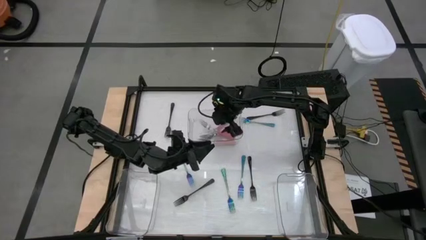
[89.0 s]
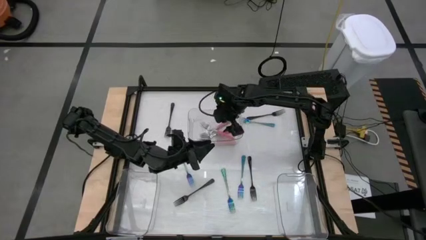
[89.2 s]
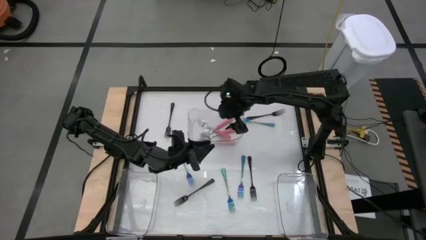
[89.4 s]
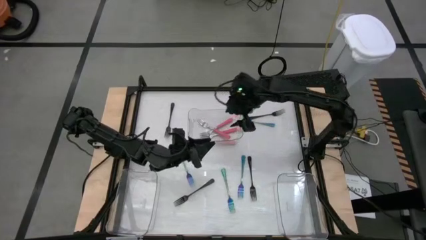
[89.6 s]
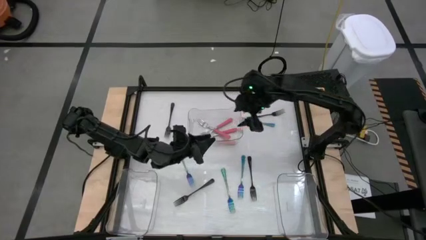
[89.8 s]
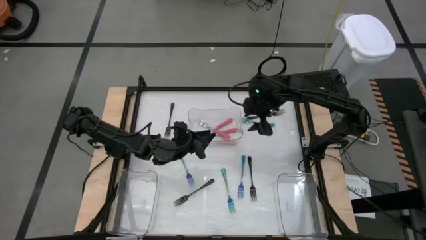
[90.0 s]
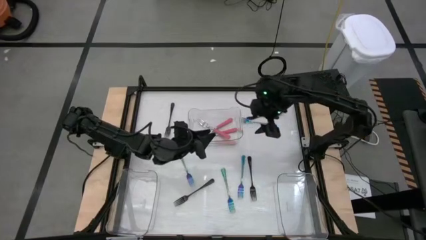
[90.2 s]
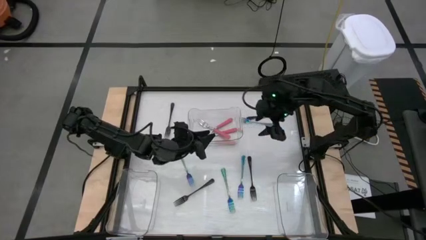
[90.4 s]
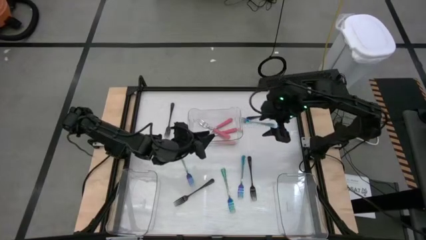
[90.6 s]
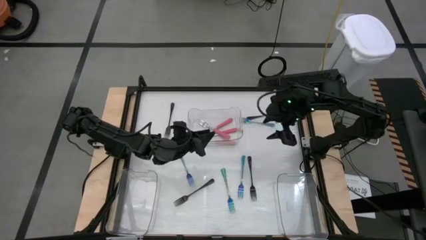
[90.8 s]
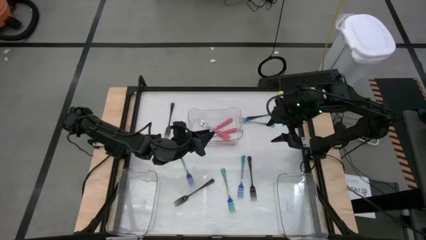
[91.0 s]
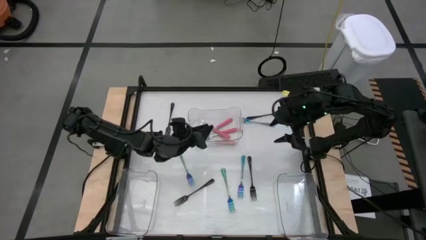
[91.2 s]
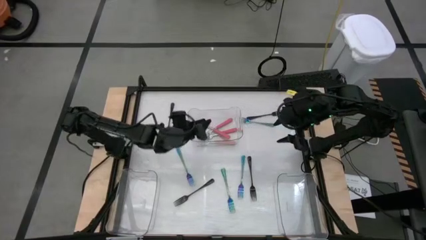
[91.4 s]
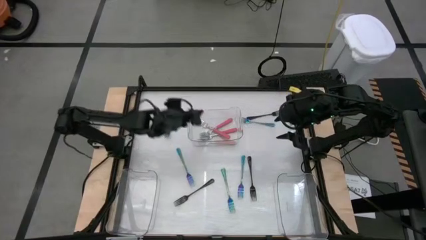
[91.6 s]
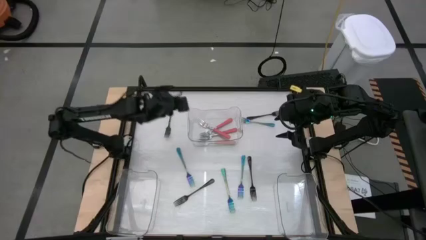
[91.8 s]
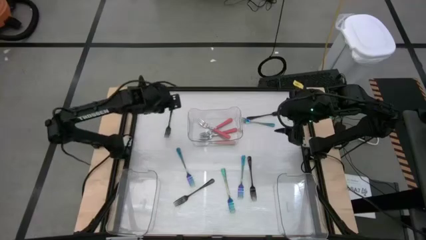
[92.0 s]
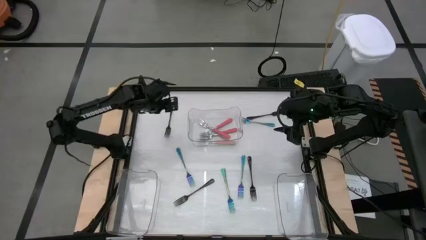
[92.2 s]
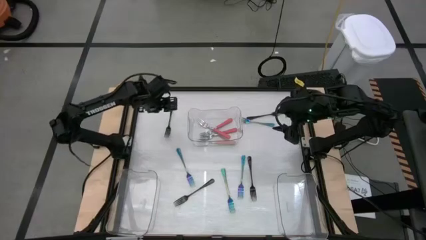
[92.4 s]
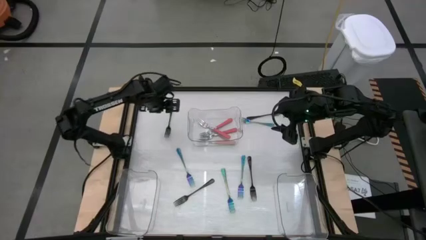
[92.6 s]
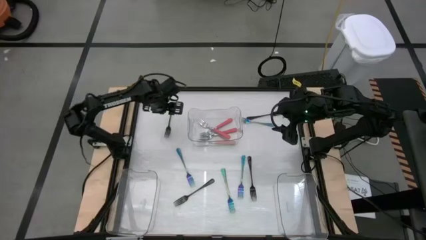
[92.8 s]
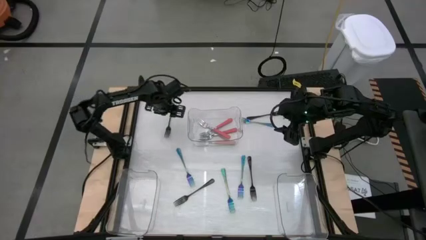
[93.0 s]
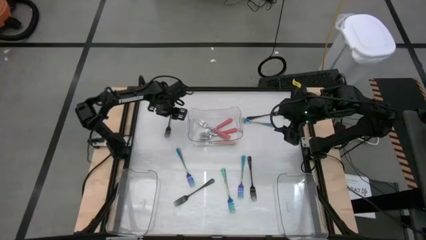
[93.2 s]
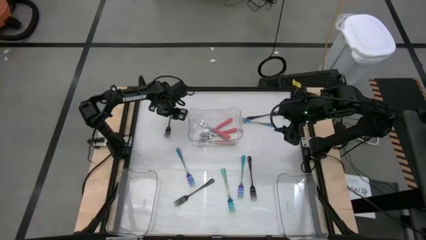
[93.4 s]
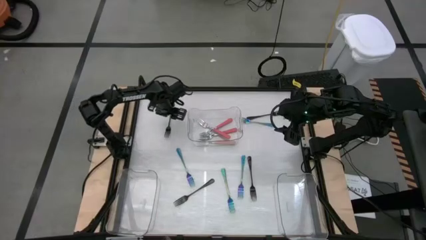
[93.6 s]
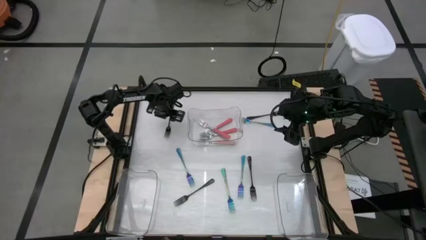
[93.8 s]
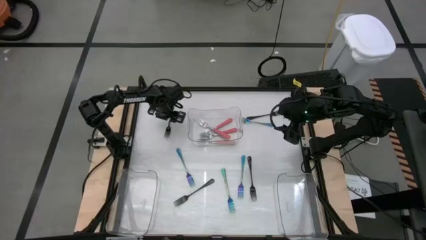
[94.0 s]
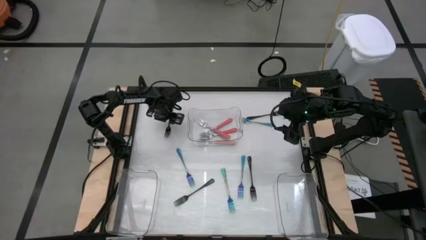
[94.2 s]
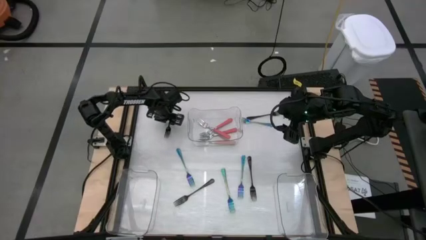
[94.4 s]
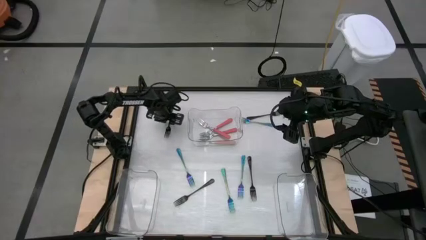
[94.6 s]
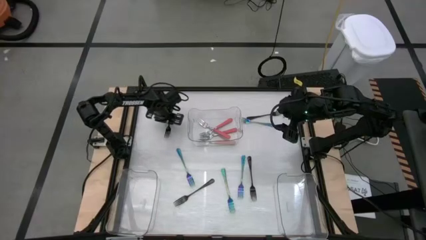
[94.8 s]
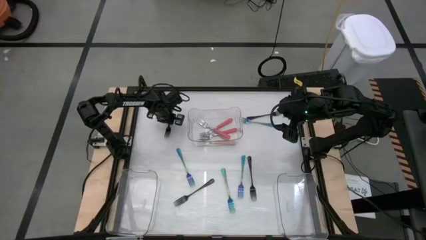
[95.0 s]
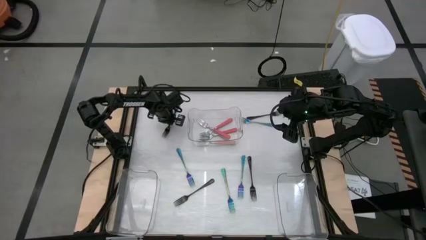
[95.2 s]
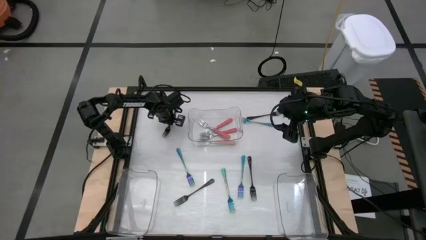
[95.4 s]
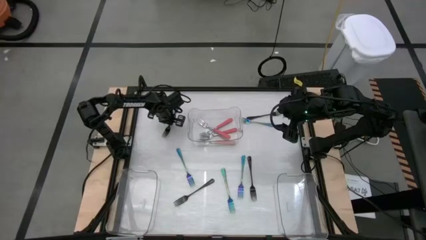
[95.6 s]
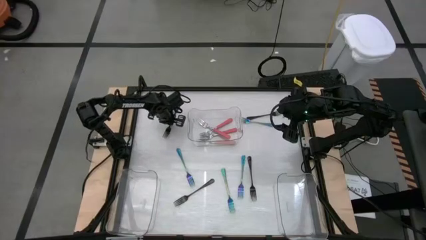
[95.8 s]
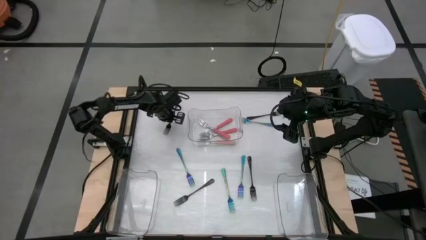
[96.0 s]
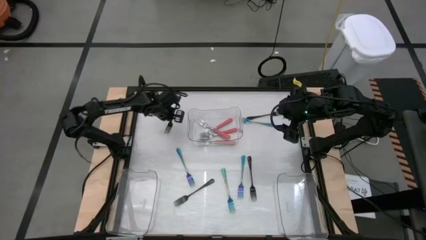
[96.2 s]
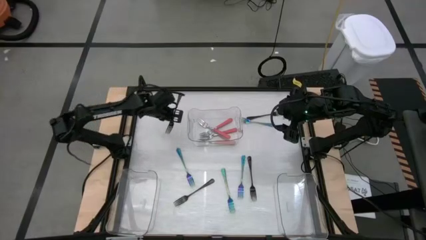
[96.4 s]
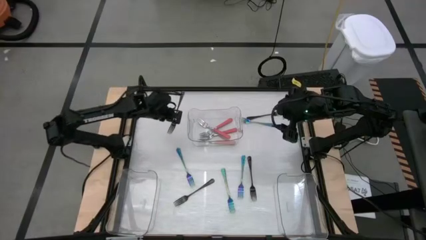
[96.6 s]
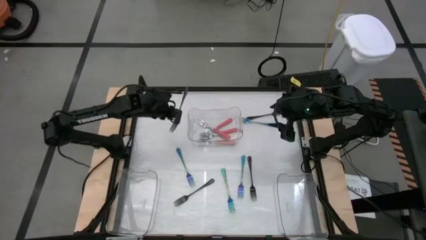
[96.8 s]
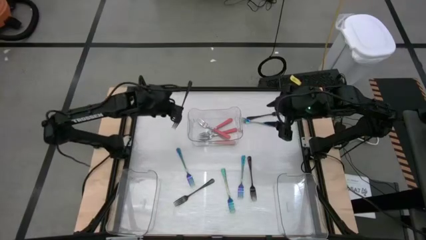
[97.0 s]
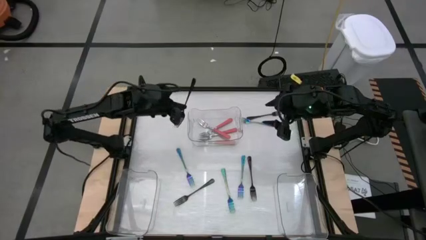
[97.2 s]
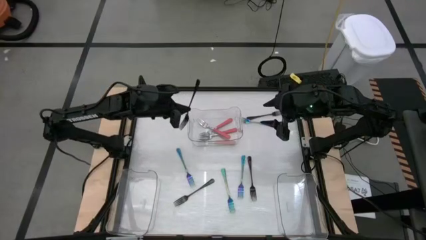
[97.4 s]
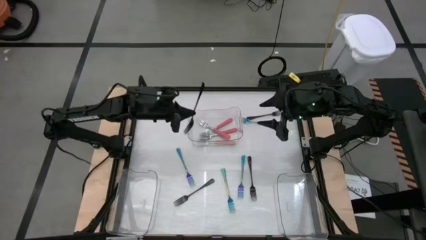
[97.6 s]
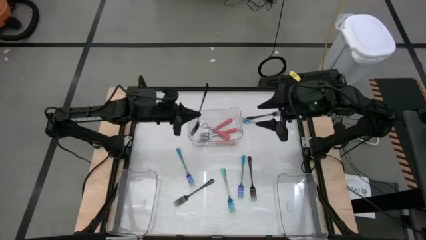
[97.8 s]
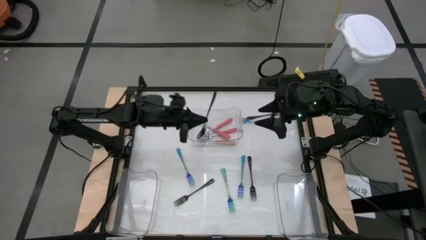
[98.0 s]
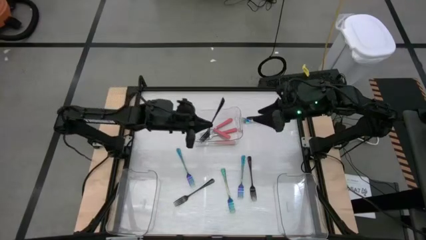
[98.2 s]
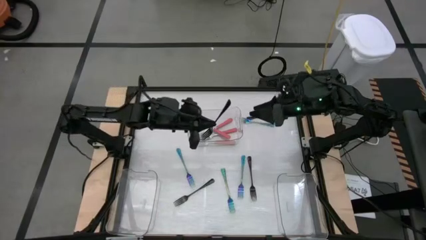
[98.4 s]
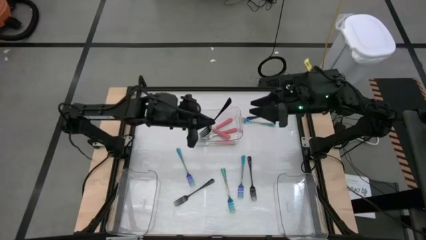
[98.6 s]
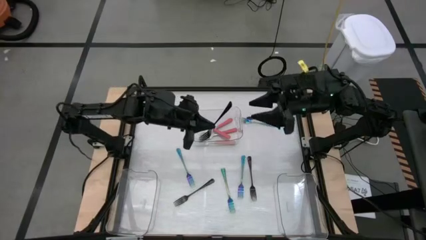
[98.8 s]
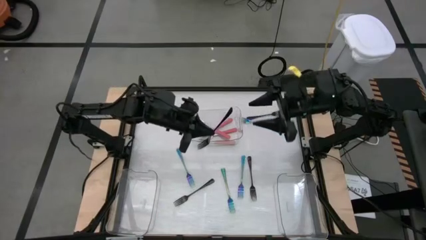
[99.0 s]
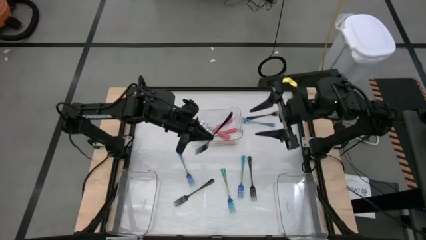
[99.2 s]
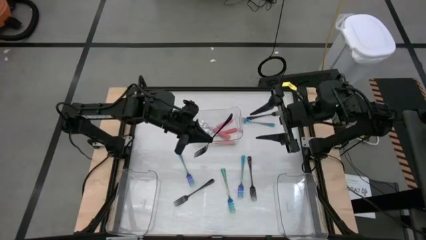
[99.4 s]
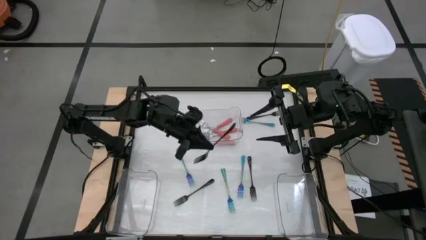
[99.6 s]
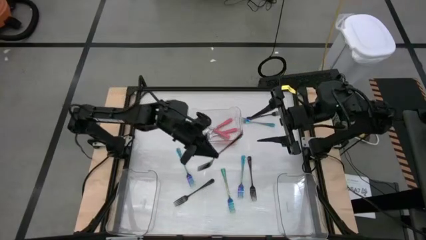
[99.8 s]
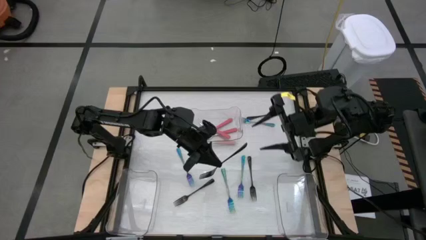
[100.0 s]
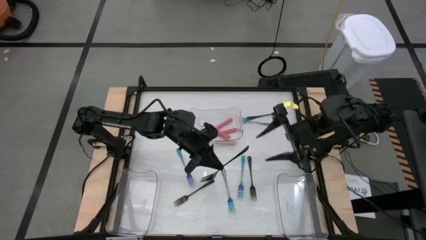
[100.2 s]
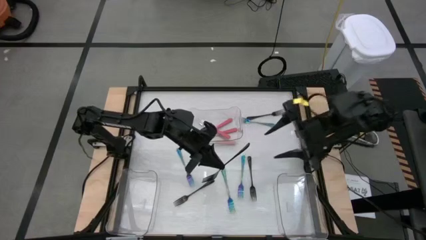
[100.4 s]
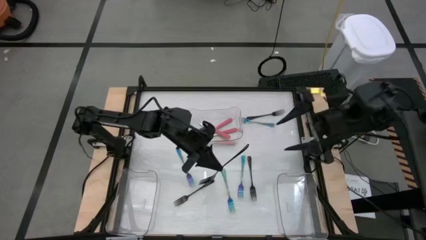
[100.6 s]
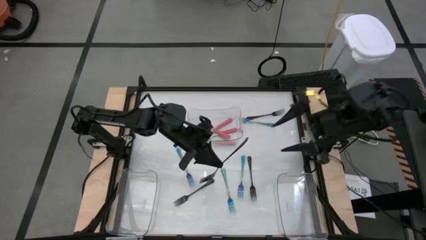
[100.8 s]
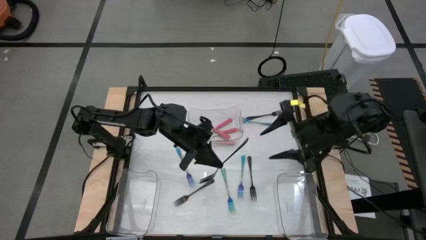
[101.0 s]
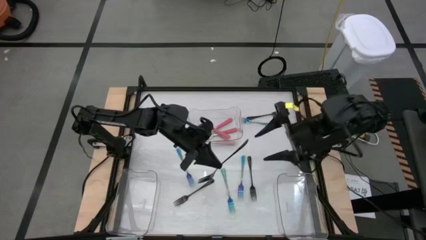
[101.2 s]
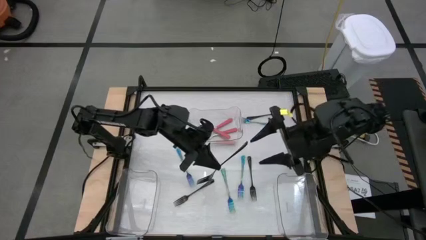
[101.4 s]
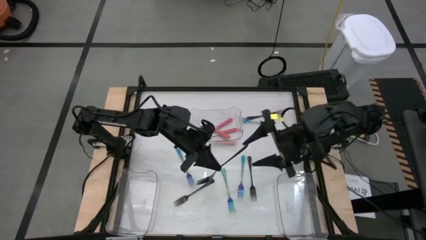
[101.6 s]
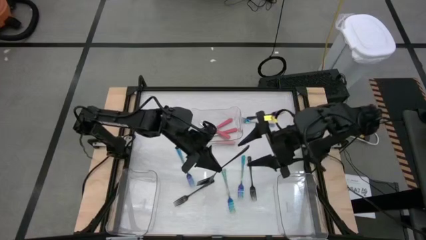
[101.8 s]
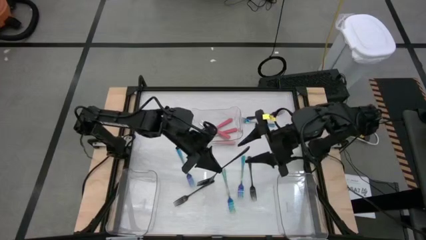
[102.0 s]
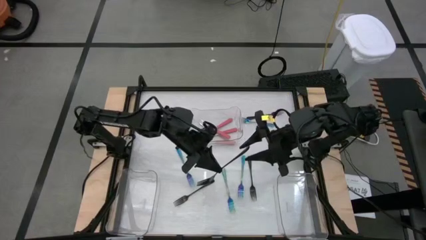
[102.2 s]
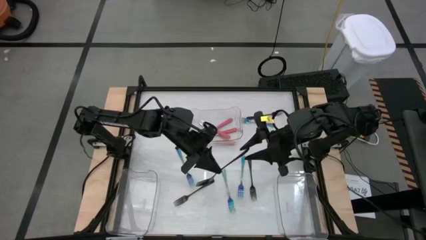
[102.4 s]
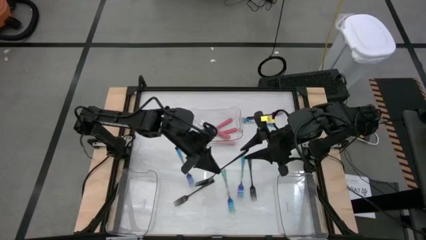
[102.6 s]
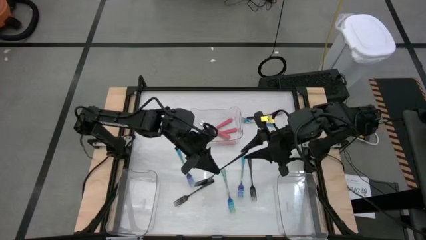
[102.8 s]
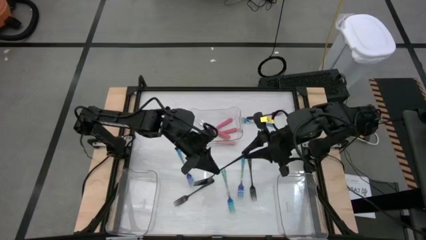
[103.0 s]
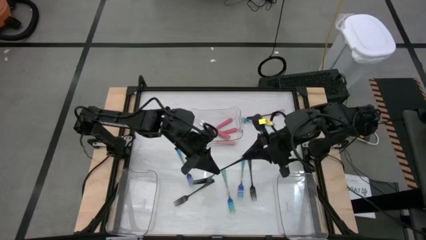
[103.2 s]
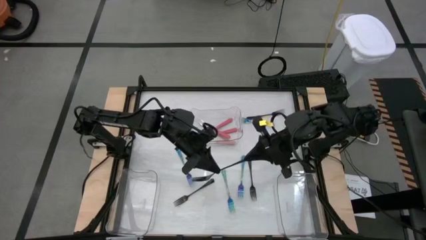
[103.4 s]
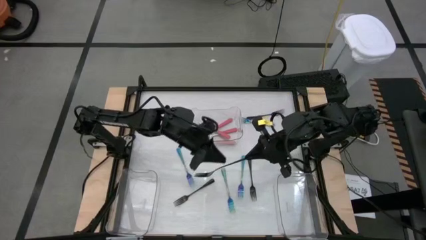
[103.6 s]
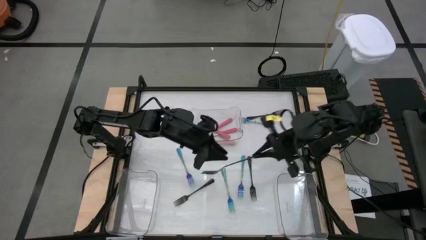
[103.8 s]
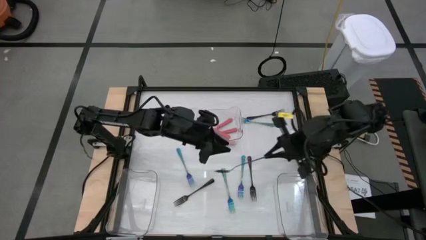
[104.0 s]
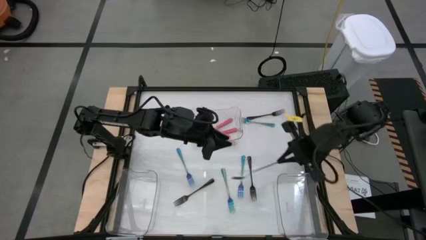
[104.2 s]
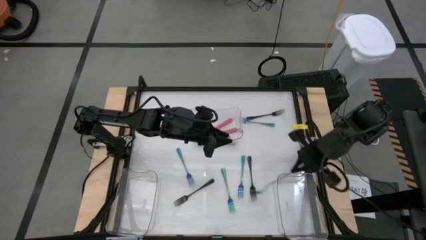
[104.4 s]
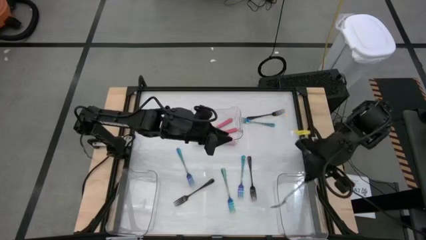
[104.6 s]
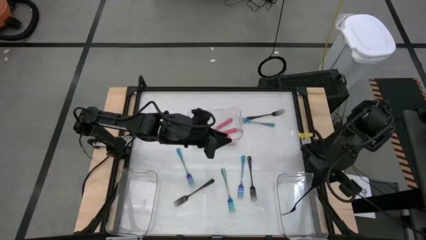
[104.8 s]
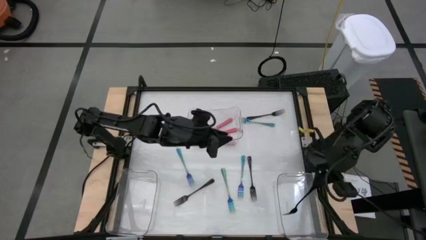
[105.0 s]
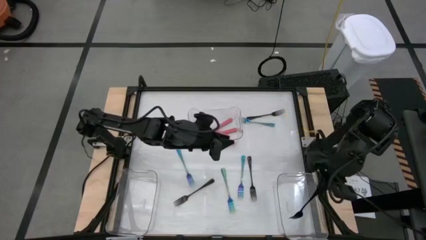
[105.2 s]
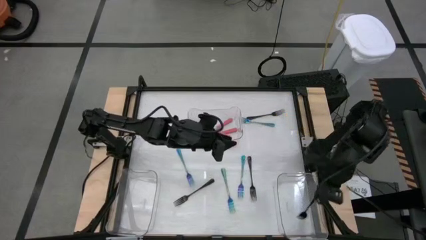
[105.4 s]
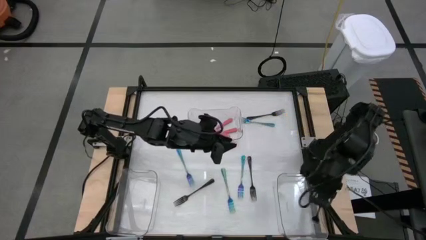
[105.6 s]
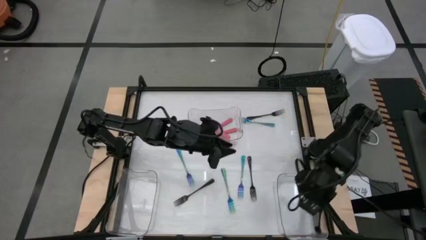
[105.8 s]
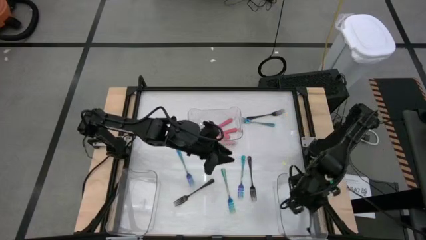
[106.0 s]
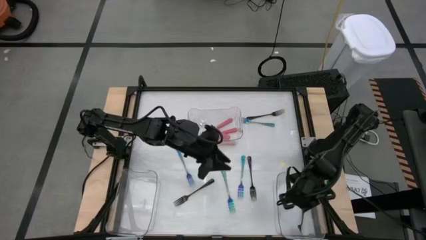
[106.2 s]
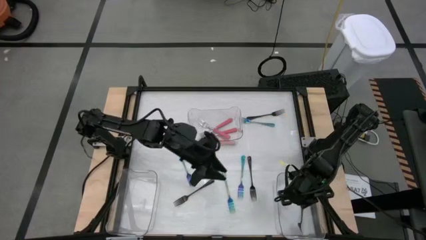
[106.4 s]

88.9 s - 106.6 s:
Task: Sort silverware by color (type)
Put the black fork into the right transparent bin
